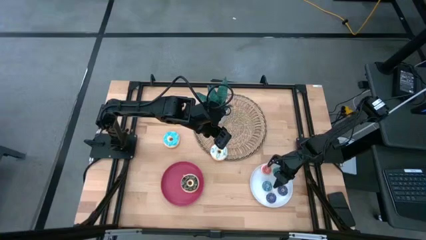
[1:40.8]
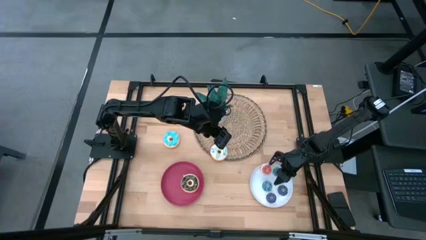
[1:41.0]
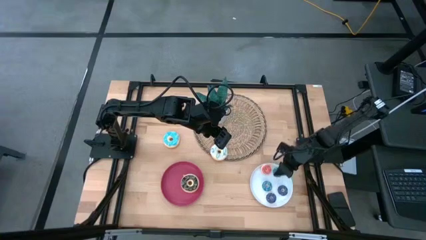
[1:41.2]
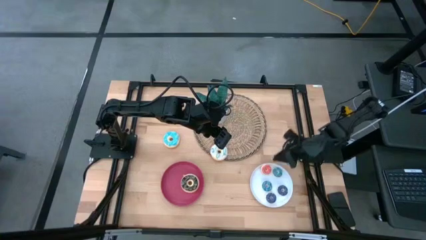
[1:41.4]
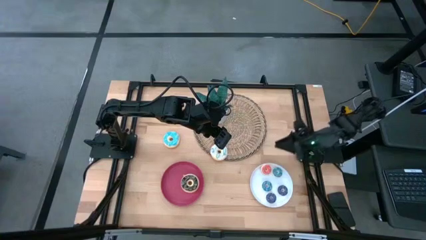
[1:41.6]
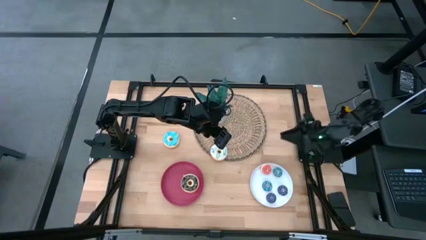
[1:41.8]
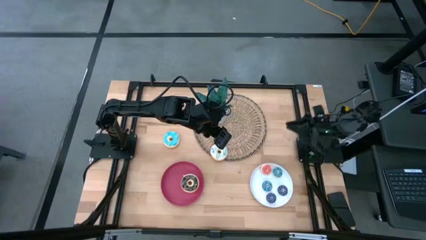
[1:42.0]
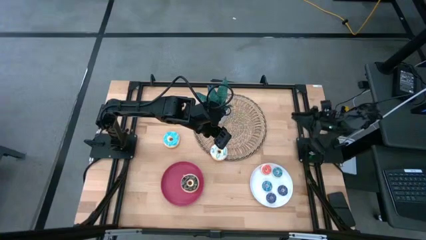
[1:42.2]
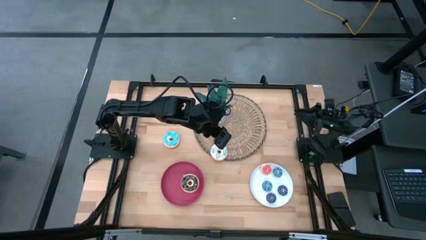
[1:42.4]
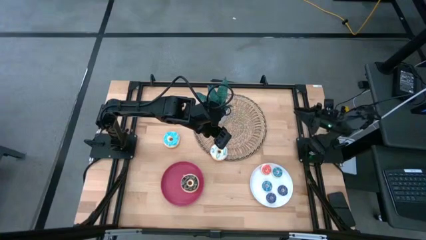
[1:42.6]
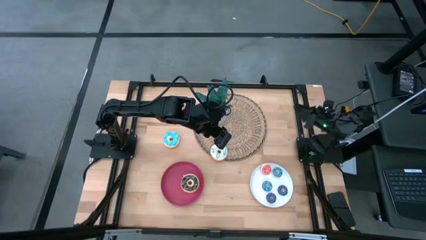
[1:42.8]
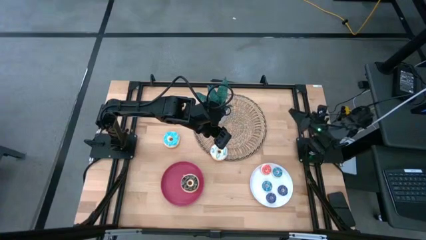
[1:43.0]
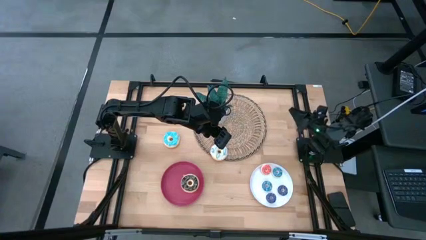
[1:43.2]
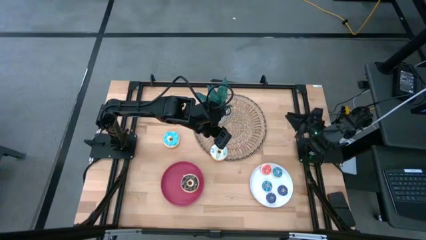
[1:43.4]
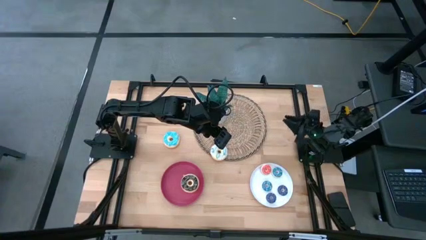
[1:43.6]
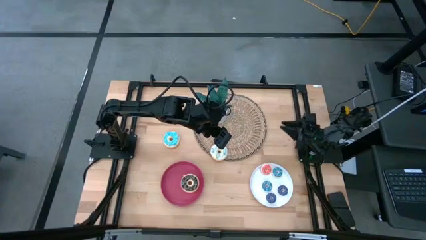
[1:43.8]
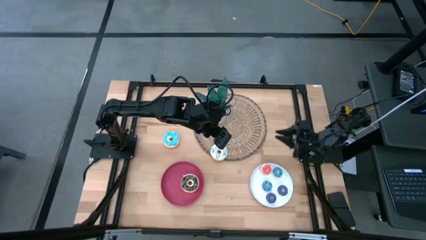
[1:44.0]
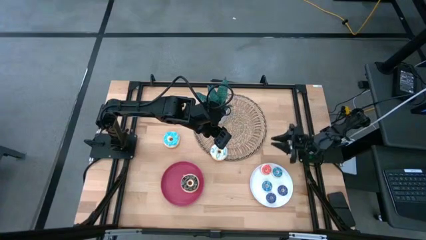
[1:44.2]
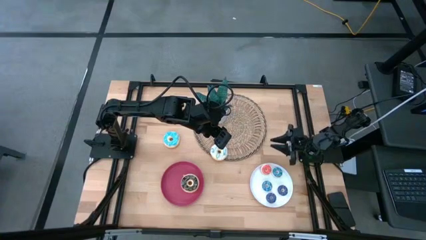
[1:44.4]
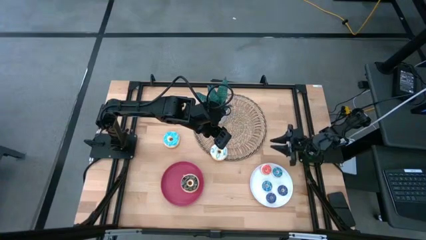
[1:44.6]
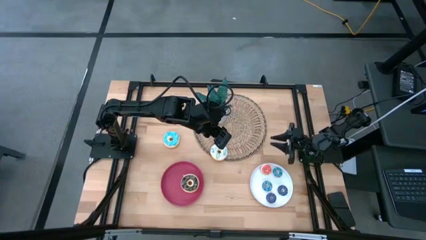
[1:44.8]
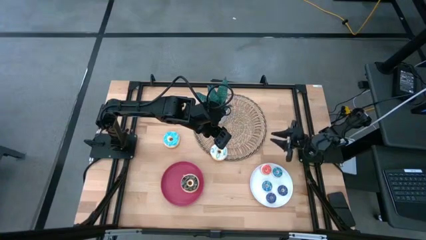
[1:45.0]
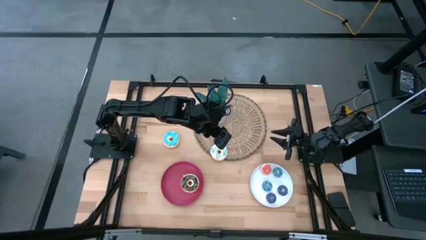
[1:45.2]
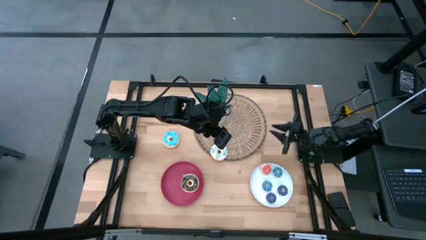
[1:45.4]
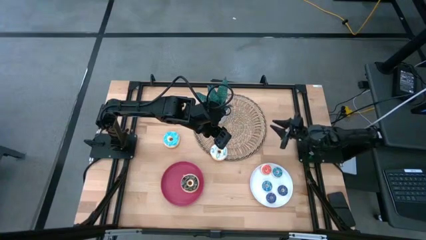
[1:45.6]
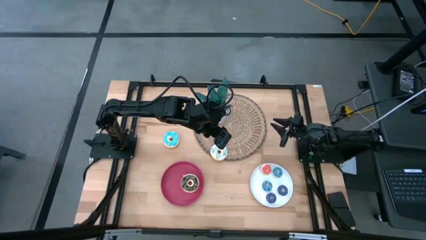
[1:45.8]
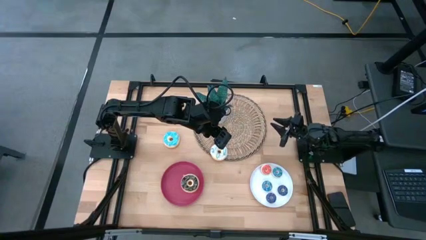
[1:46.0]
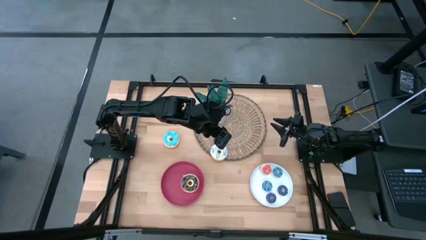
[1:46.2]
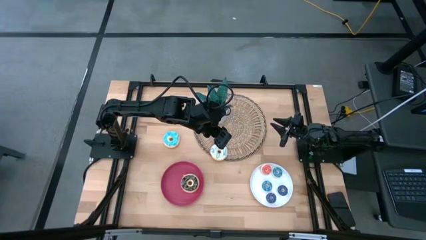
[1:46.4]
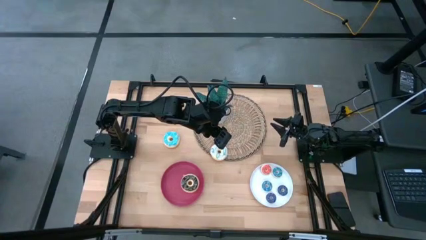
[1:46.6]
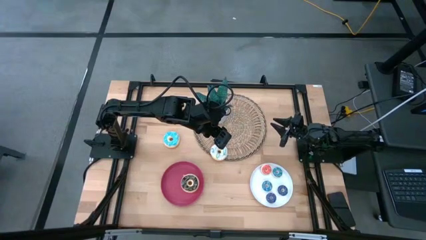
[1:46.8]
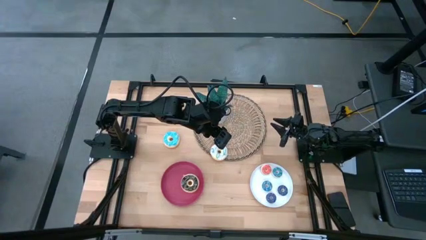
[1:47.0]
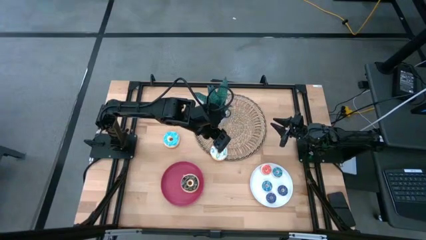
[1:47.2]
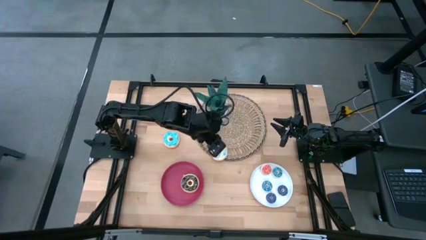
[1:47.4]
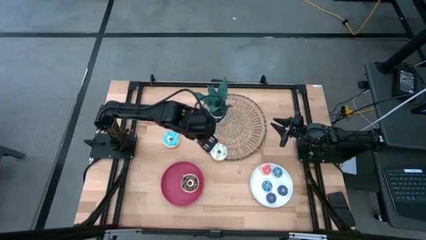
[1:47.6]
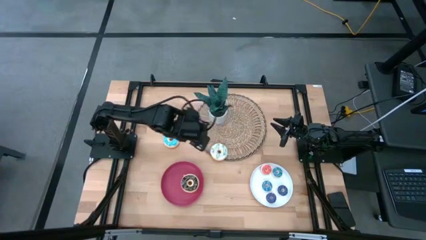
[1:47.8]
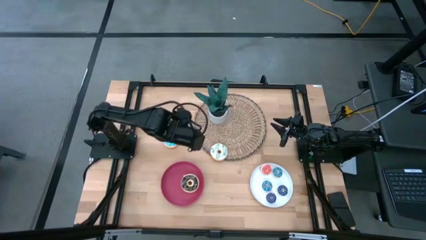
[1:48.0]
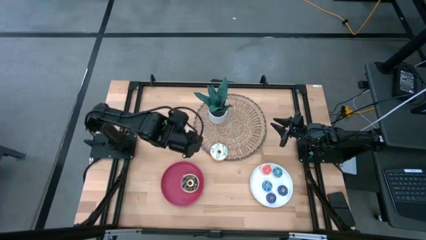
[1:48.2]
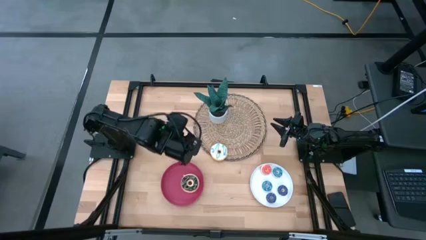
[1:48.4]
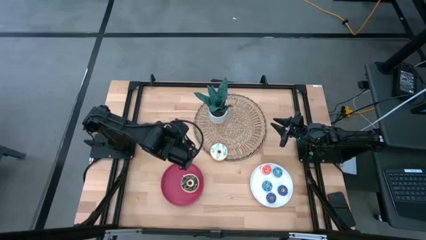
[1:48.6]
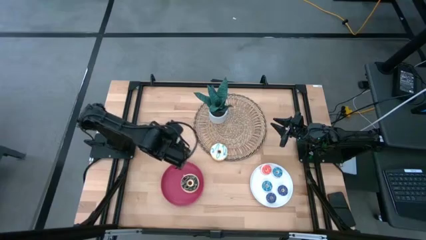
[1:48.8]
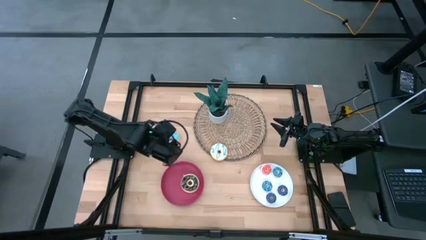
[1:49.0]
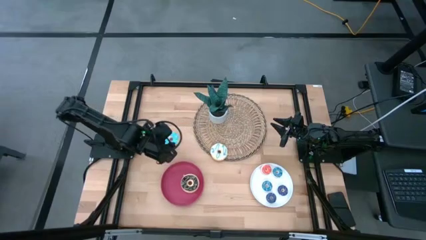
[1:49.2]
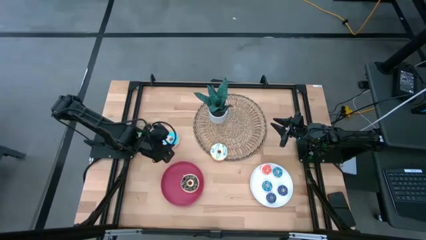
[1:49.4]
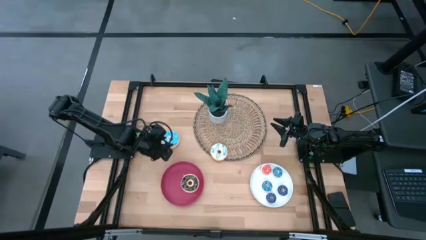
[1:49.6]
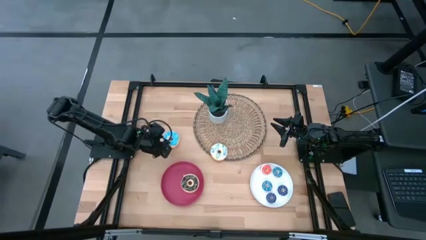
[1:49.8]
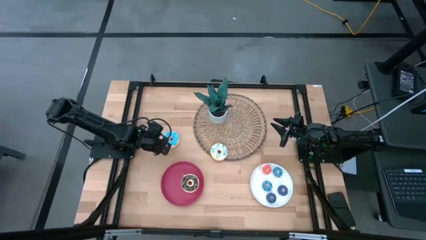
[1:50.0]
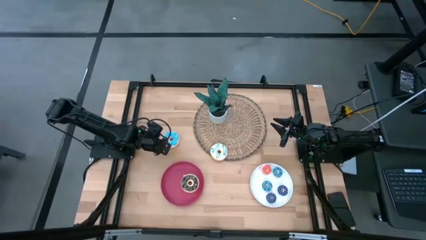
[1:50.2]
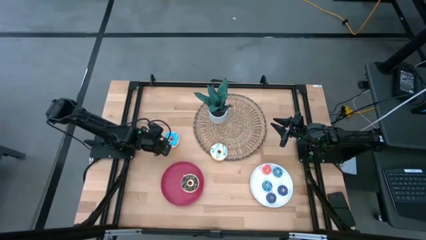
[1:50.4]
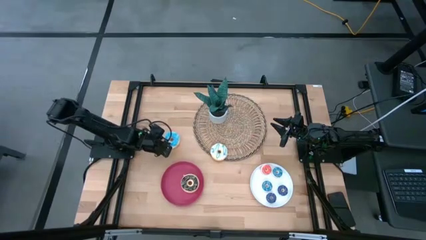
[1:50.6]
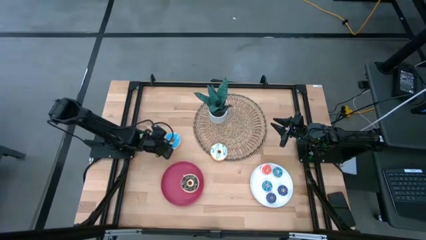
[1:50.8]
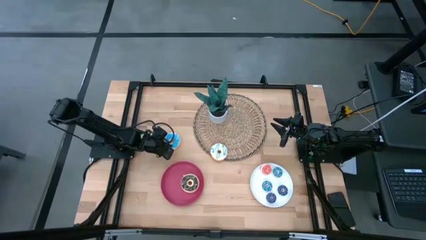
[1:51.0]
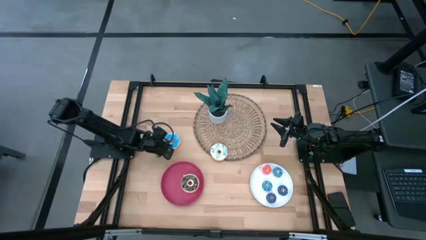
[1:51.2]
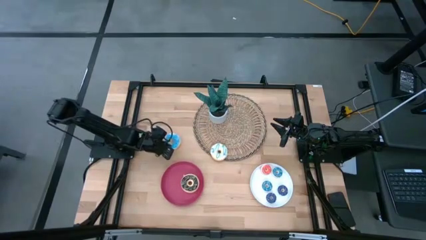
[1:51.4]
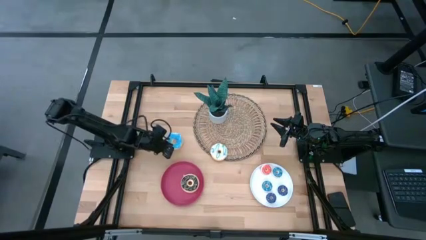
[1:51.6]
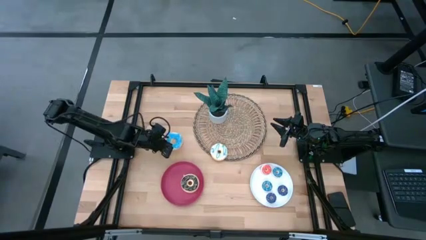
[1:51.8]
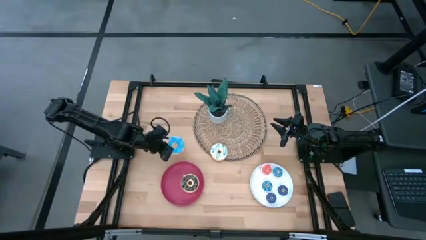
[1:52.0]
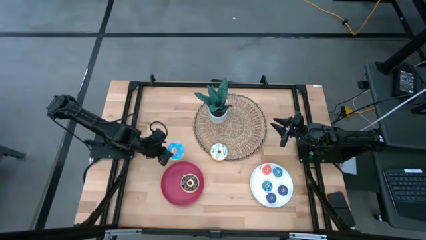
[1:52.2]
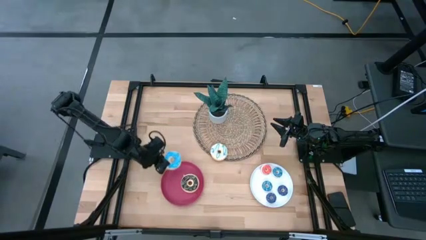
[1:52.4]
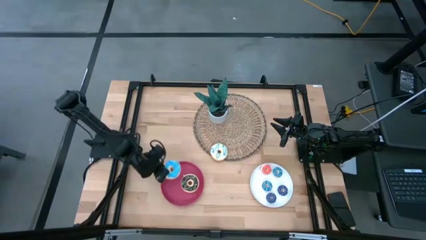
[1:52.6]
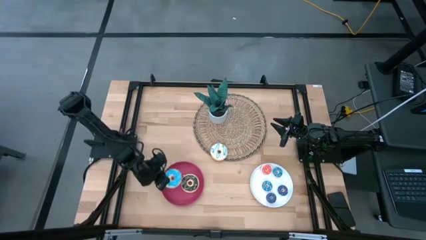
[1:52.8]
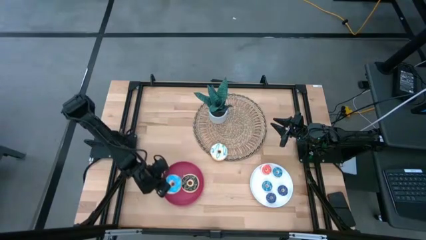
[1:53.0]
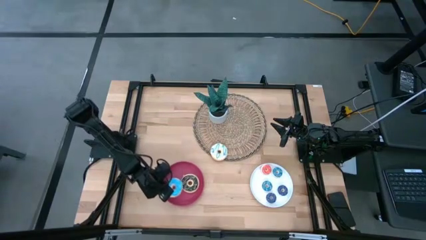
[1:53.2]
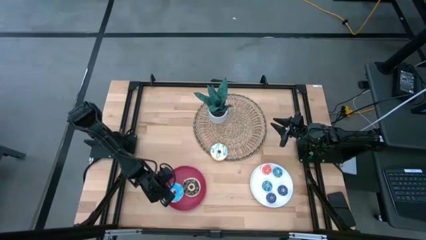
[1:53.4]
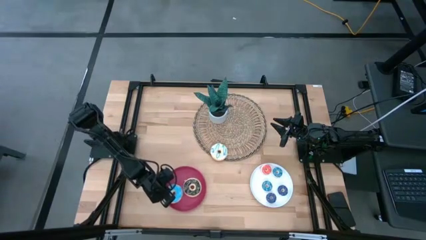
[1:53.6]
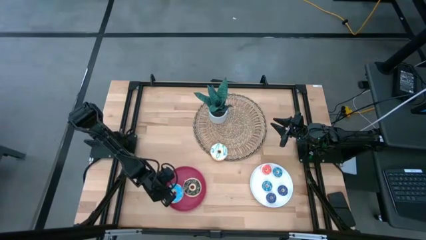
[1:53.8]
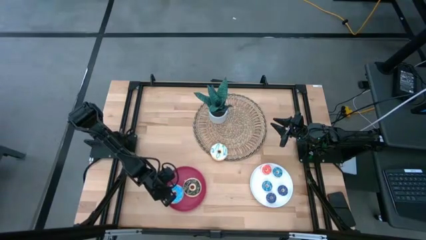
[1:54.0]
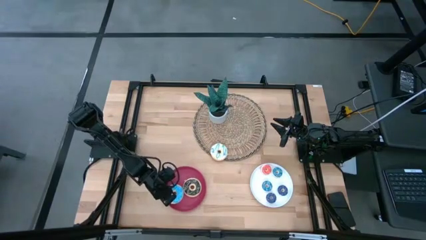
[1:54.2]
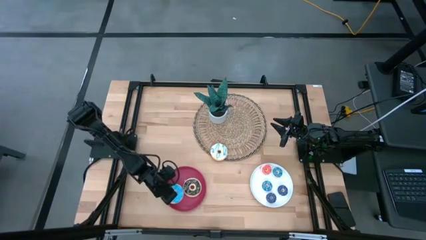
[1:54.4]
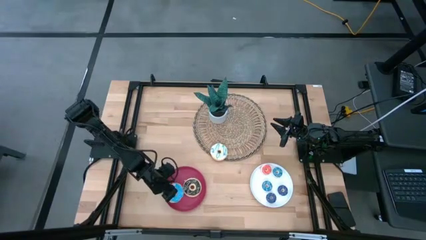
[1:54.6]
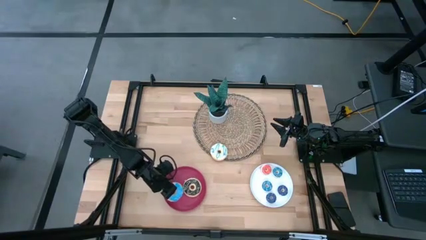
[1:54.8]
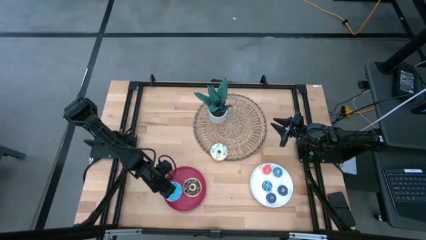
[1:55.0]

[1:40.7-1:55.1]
Task: Pick & Place donuts
Put the light blue donut on the dark pink plate
